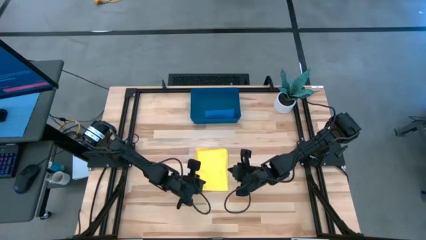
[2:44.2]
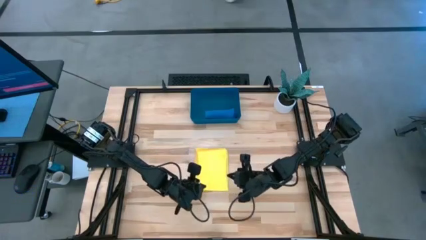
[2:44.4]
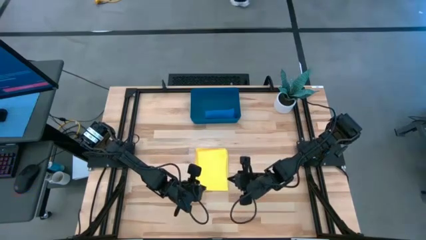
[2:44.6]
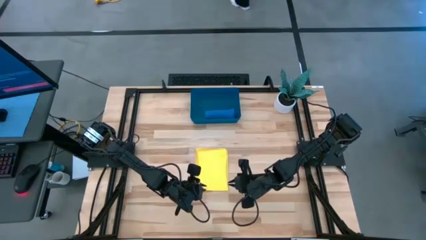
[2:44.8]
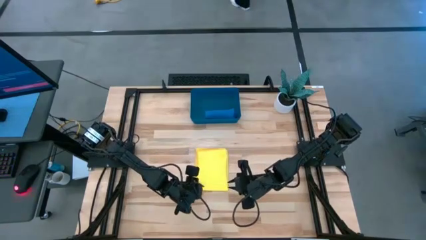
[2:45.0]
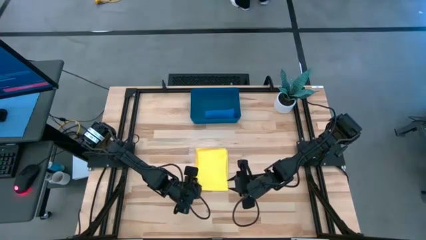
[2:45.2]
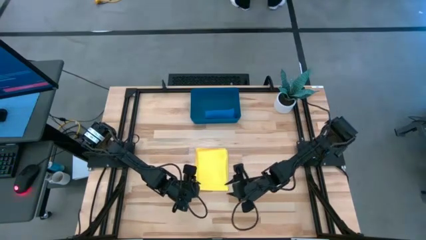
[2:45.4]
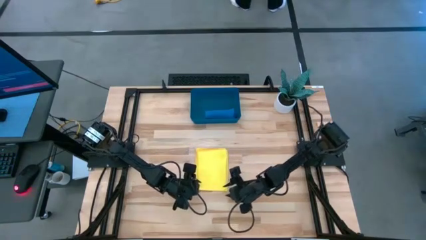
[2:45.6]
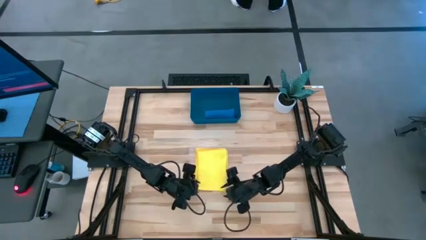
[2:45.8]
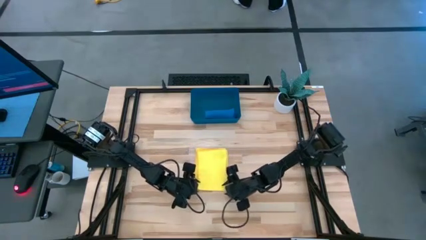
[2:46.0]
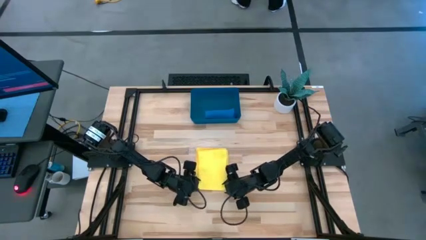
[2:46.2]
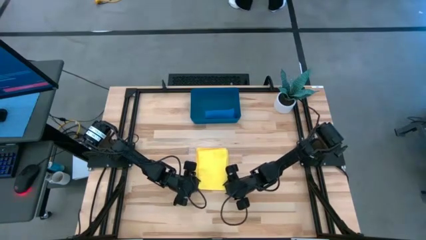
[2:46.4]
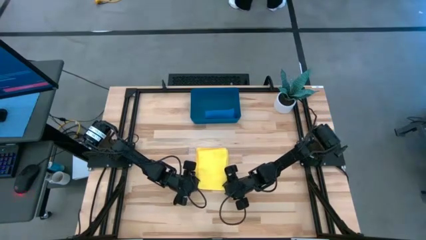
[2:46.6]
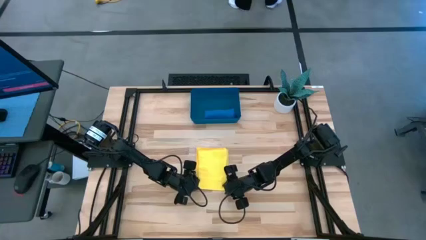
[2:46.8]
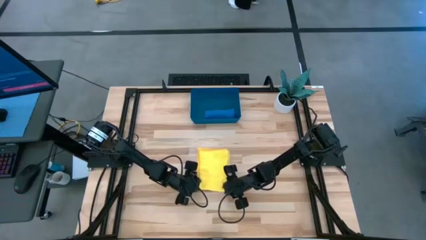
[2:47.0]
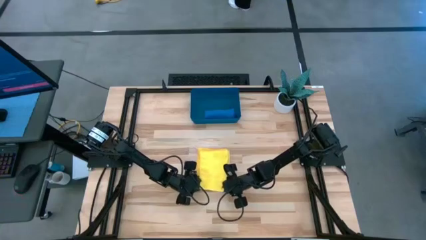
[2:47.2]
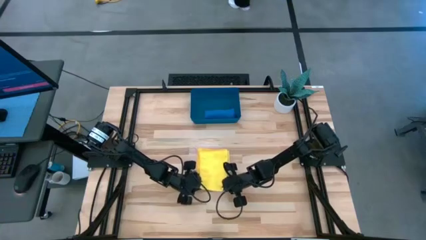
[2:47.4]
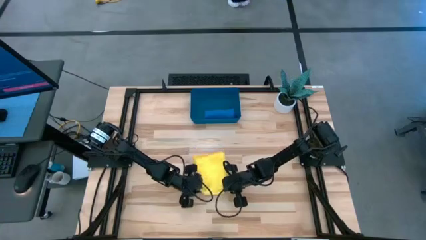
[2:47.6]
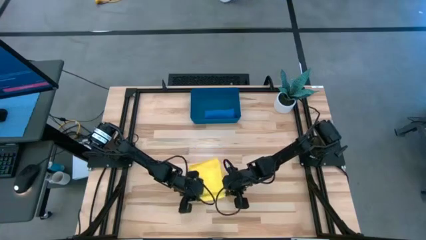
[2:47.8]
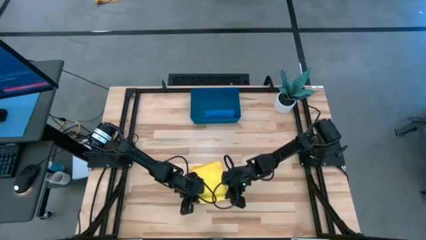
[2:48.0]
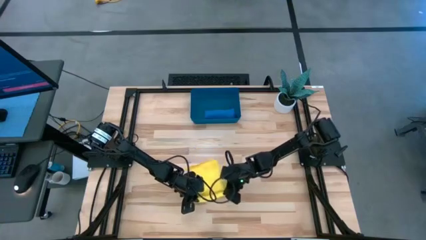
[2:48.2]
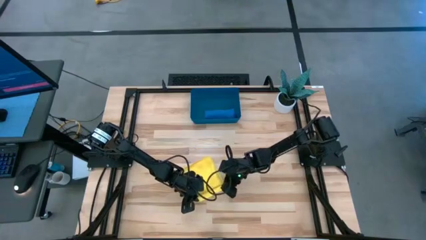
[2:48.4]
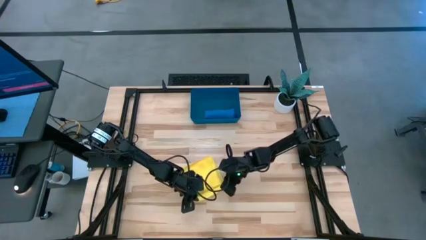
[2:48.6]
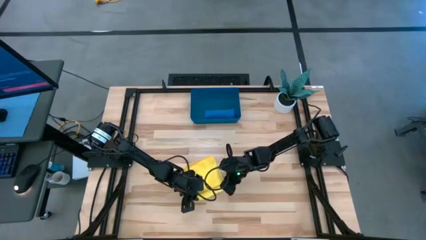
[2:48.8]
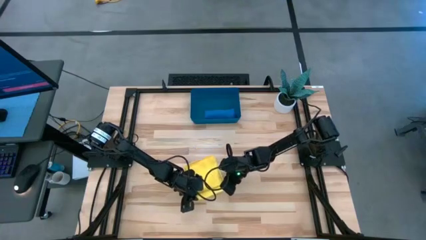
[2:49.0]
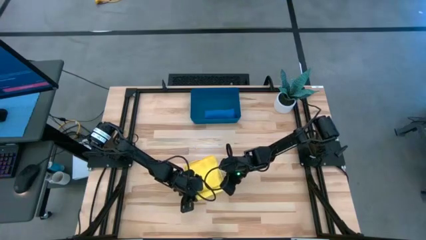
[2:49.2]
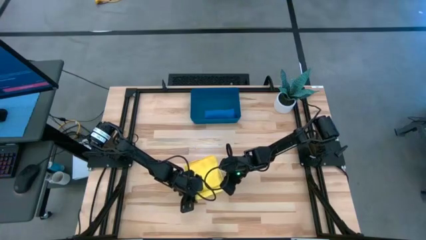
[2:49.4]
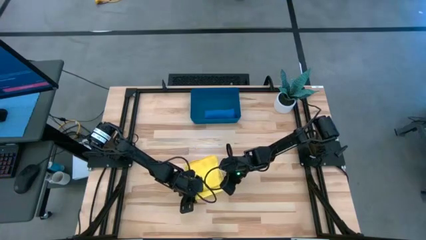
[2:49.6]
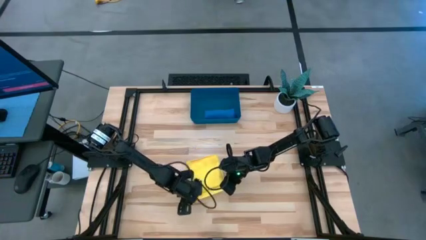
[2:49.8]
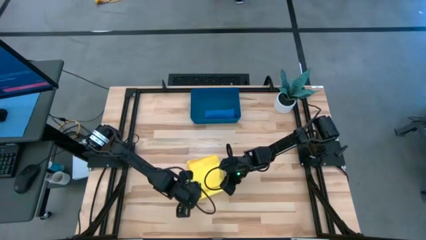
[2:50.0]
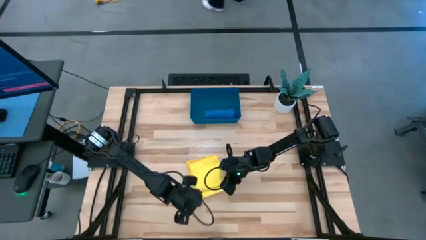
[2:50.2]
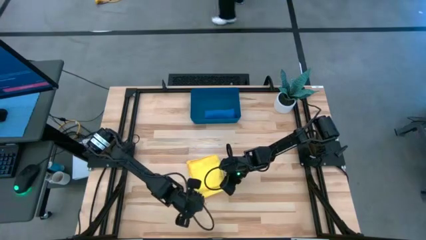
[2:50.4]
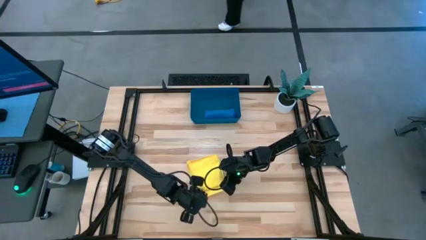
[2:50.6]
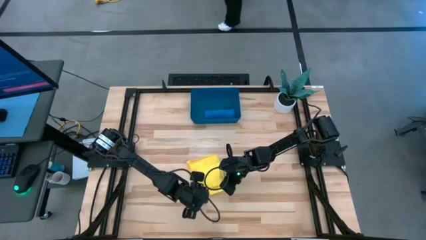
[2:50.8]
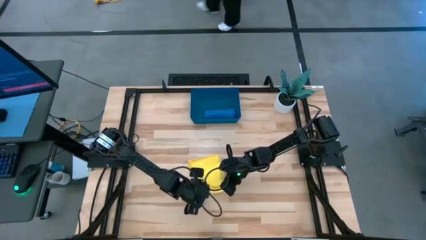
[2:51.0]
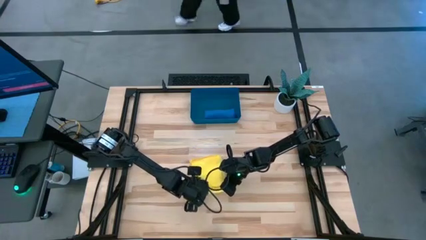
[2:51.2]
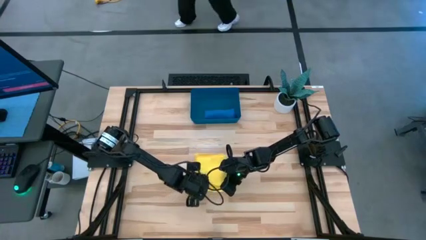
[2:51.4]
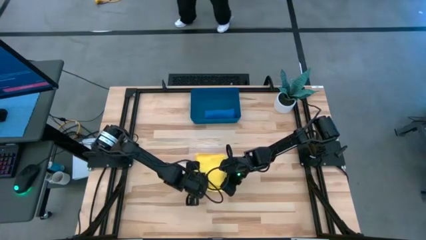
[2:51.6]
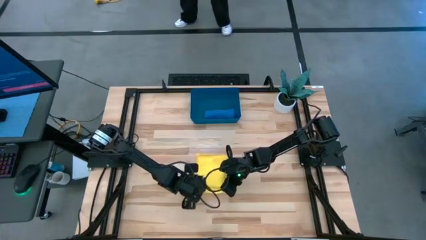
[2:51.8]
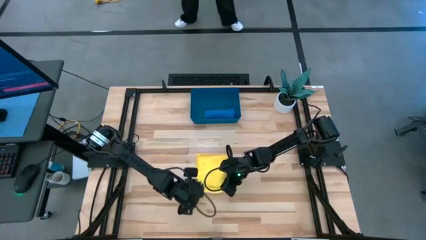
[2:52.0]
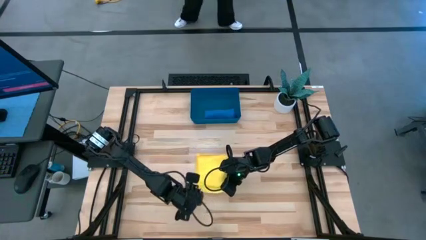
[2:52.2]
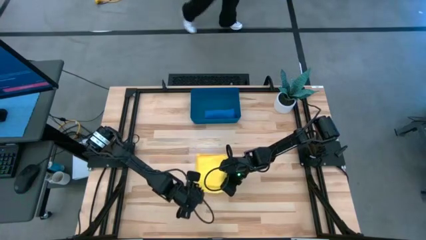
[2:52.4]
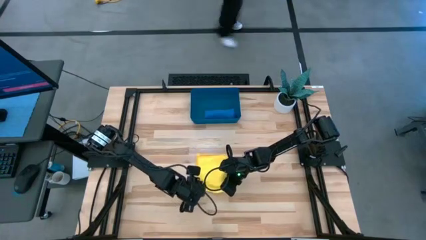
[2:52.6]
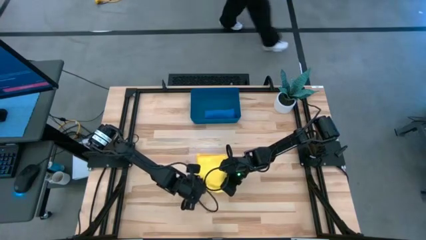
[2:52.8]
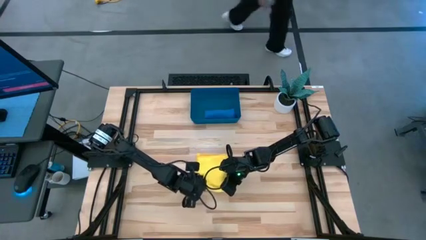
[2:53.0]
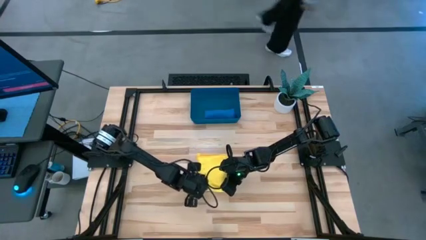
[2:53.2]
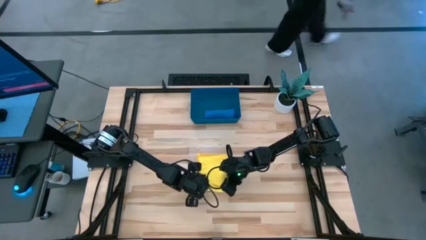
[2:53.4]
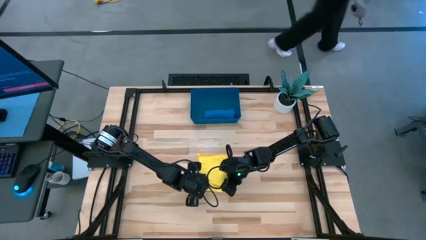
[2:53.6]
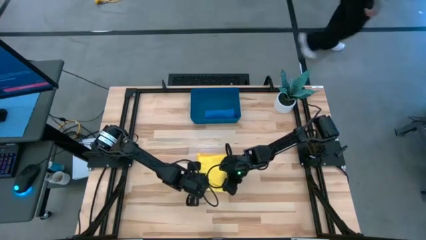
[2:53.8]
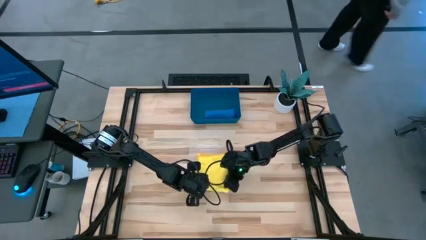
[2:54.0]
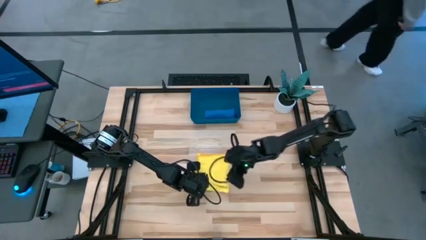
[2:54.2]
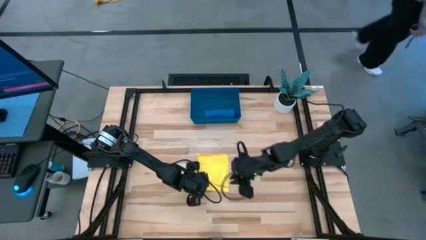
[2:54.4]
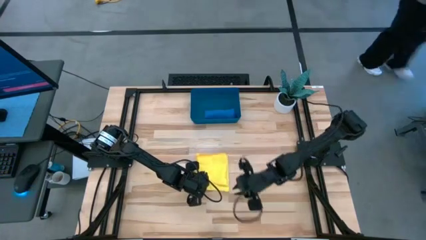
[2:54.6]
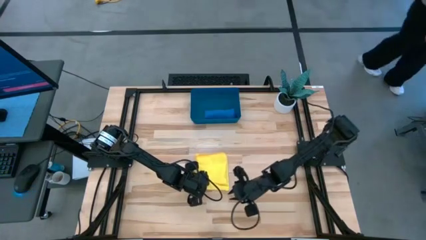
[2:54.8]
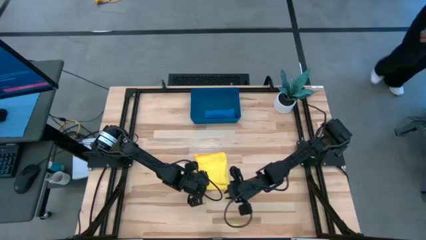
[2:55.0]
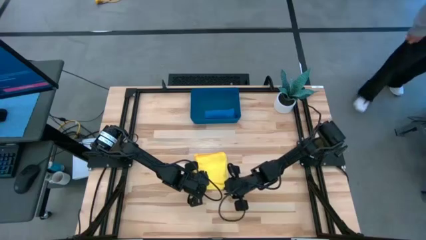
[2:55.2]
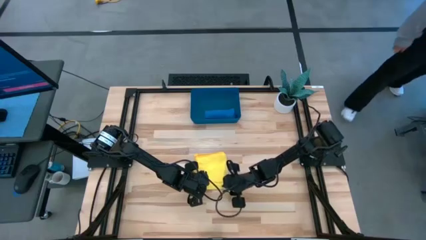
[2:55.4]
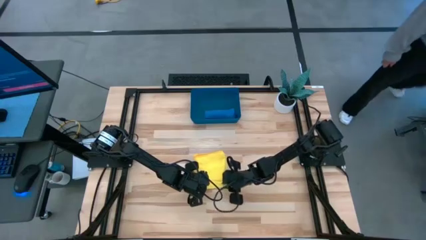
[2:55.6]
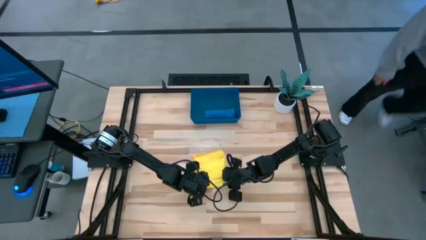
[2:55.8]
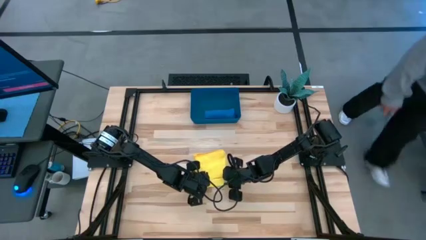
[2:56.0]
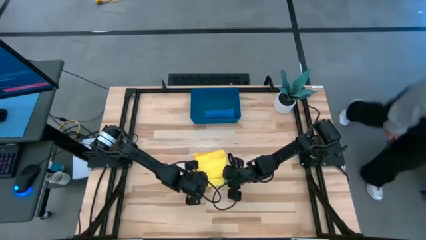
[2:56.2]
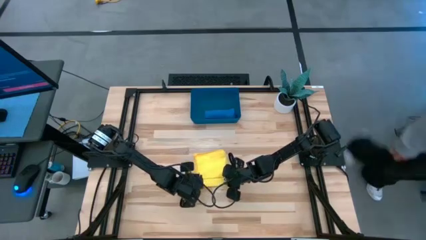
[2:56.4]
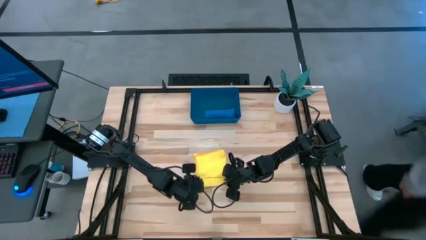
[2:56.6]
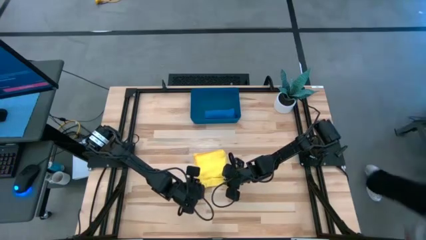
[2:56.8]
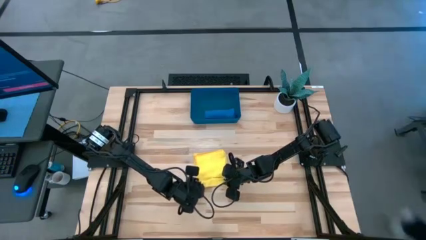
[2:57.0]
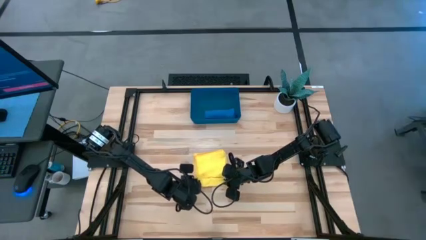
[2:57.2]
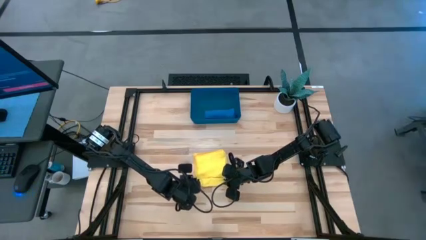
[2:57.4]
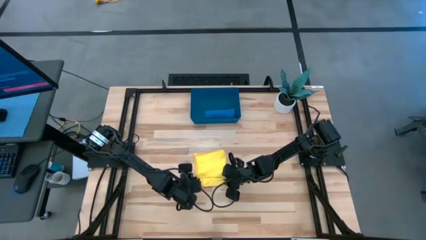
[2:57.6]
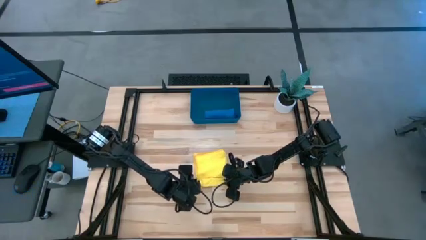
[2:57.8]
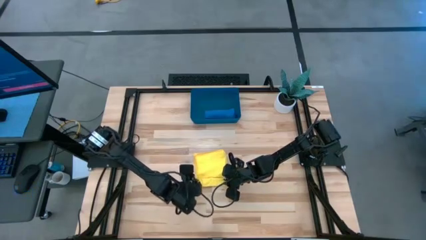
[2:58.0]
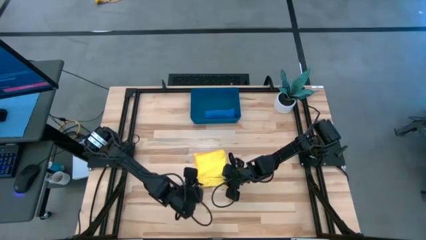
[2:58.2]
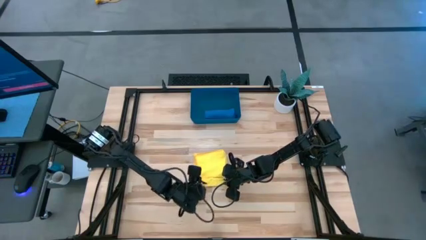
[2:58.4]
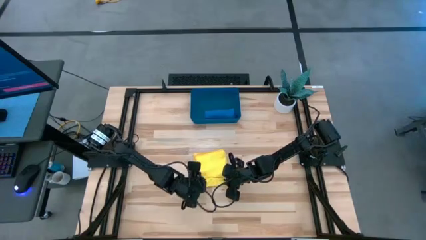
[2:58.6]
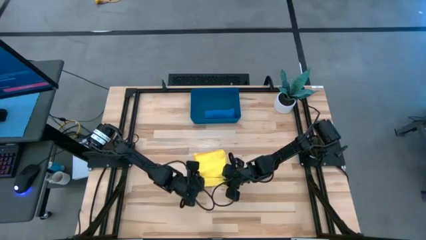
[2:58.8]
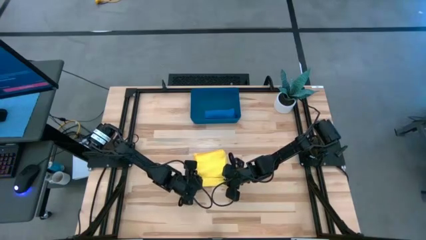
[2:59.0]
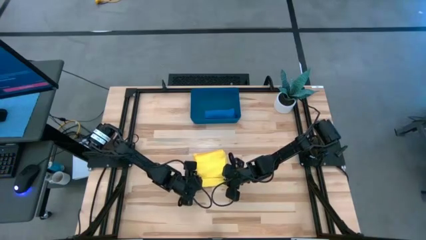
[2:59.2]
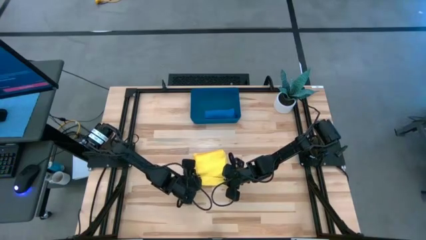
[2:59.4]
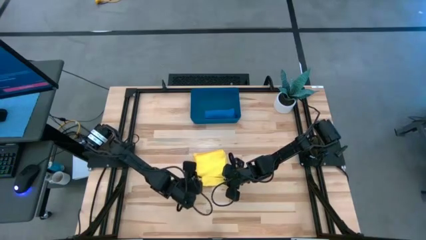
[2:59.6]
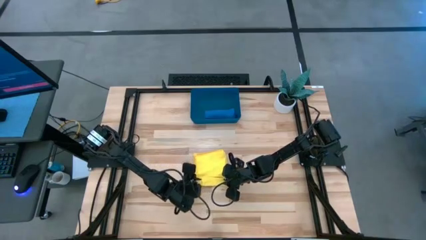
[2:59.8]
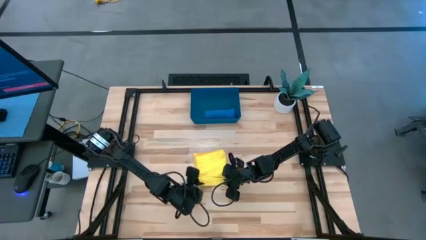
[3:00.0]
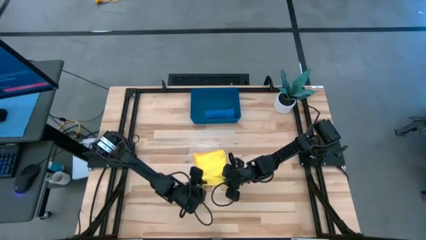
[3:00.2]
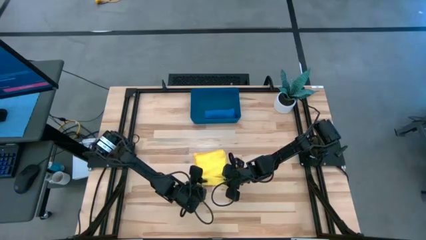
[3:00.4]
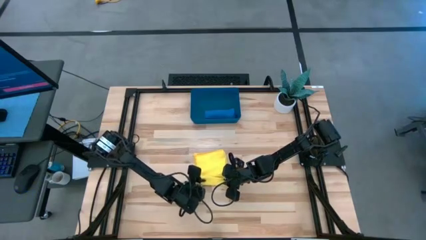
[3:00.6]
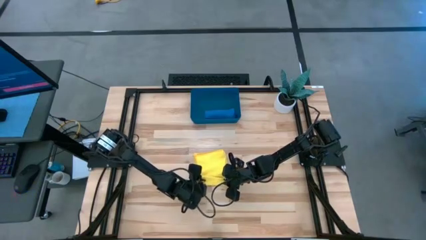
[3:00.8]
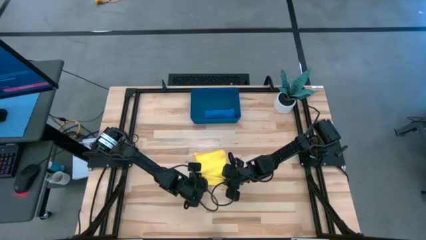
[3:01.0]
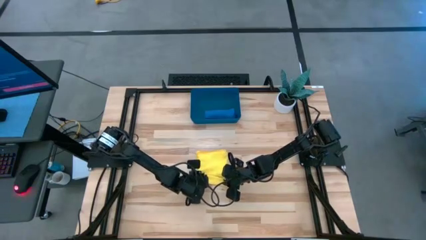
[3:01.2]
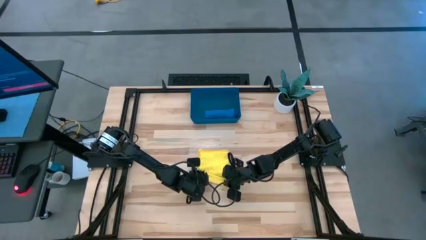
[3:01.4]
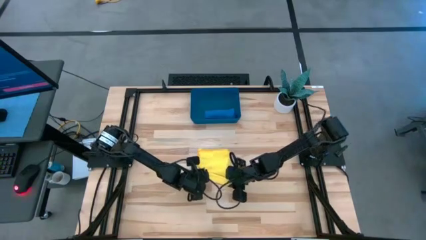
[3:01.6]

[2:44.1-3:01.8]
Task: Roll microfiber towels into tight, uniform cylinder then place into a basket
Roll the yellow towel
